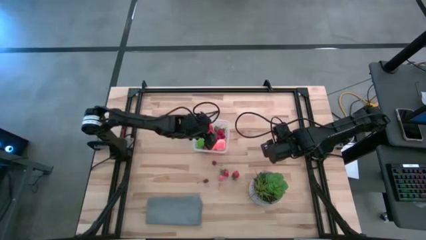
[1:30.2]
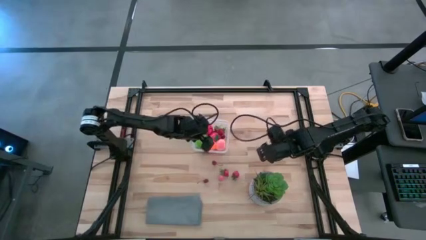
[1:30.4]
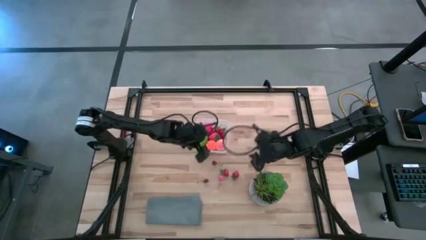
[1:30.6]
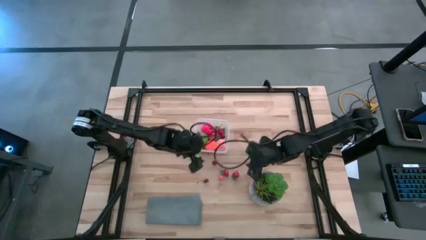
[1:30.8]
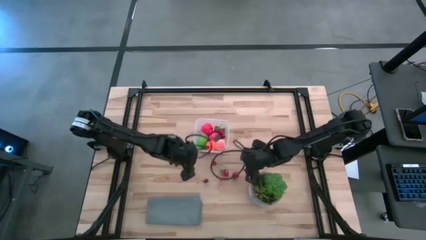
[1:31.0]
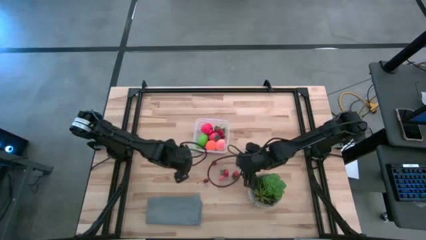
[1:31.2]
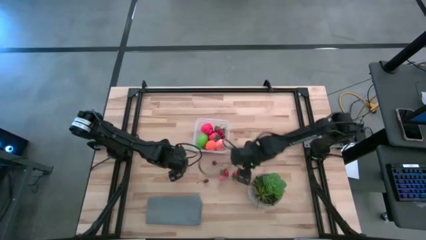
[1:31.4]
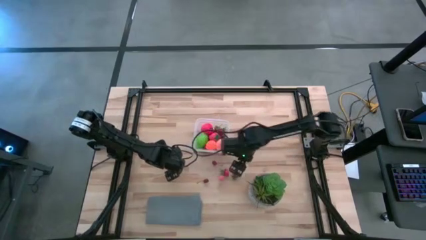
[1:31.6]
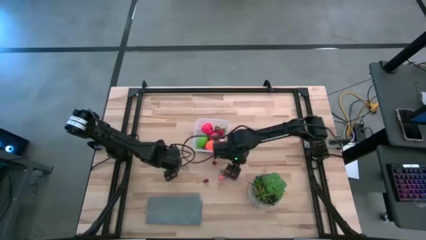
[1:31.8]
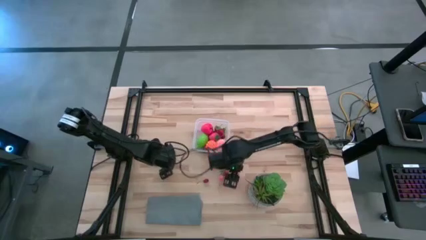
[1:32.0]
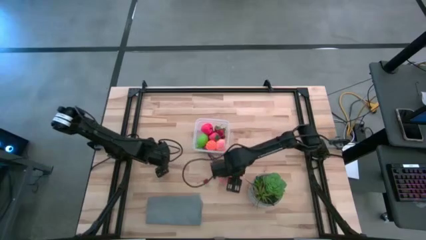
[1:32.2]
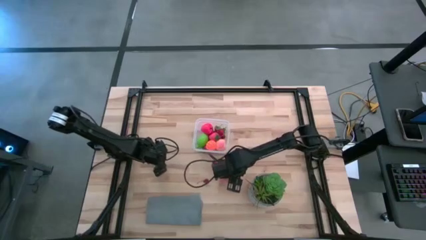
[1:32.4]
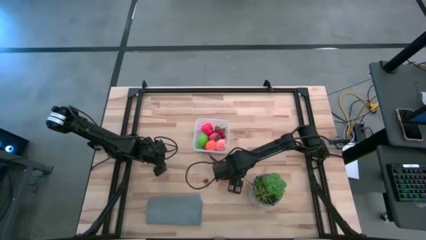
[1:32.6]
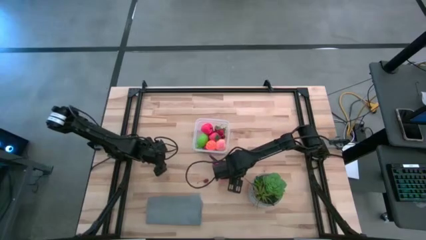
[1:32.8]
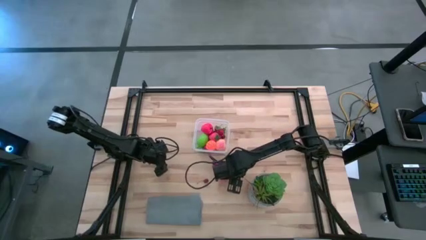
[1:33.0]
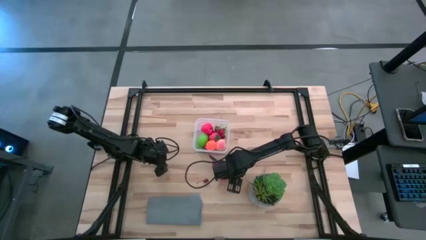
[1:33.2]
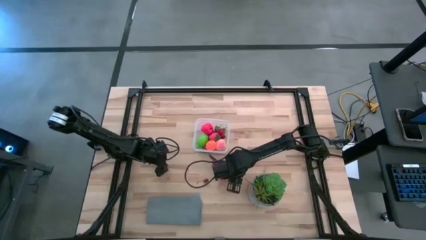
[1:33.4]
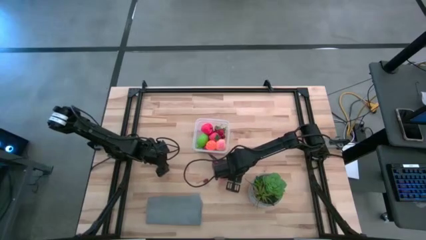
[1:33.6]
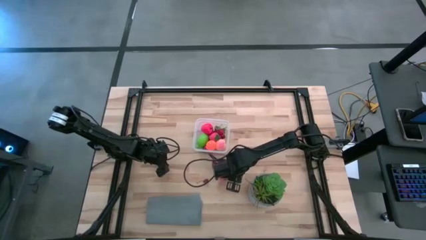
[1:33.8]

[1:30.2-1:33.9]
Task: Pick and placing Produce into tupperware
Put the red strawberry into the transparent bin

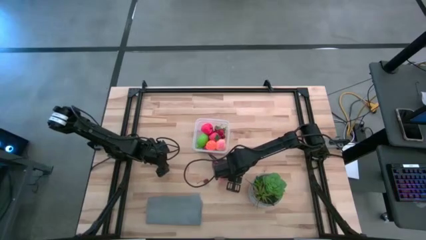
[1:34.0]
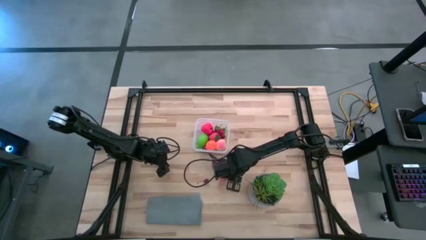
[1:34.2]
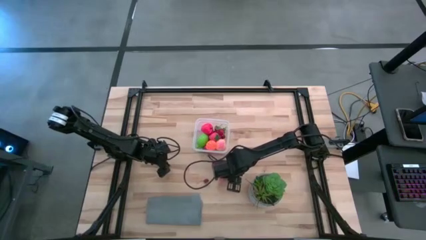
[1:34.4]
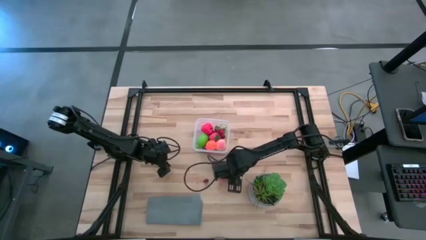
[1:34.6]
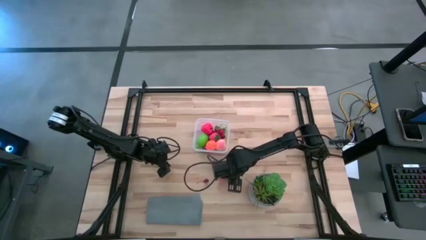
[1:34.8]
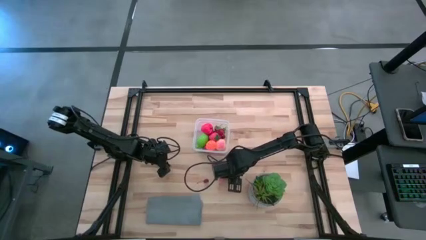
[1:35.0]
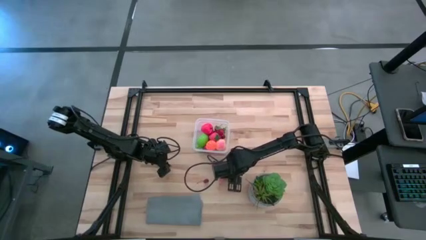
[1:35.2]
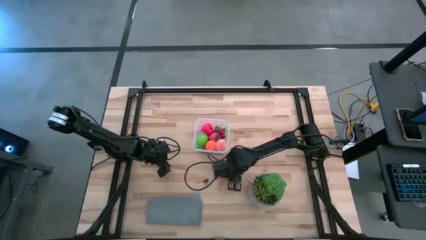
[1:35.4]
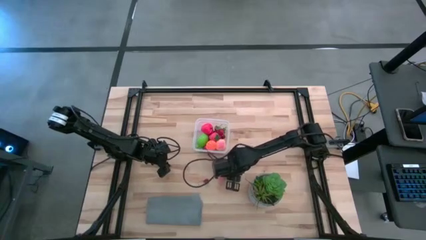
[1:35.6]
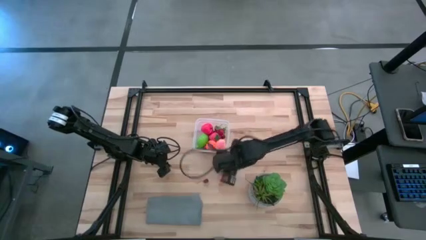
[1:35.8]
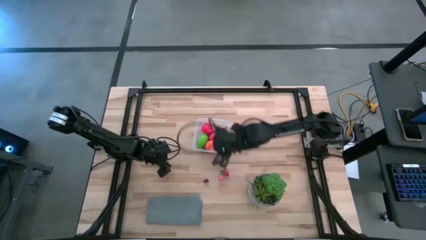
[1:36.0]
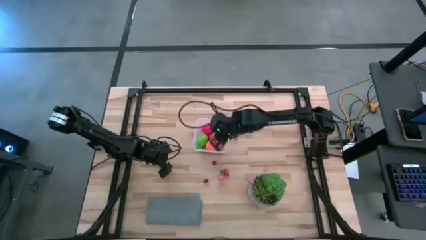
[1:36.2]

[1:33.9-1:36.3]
Put the red strawberry into the transparent bin

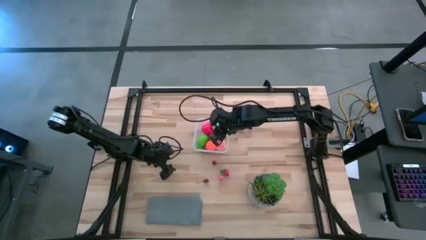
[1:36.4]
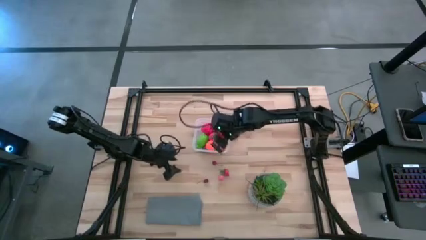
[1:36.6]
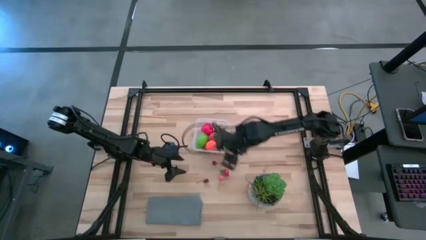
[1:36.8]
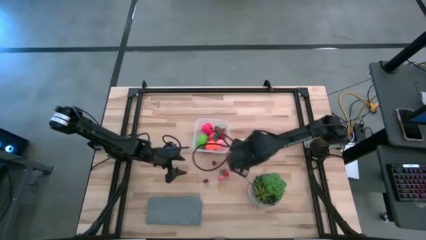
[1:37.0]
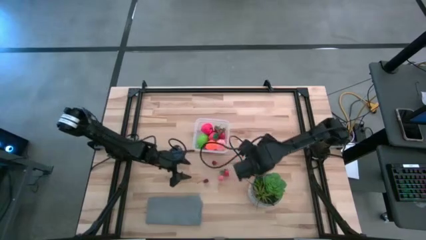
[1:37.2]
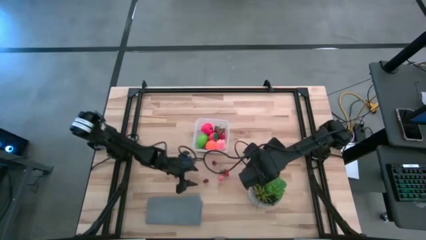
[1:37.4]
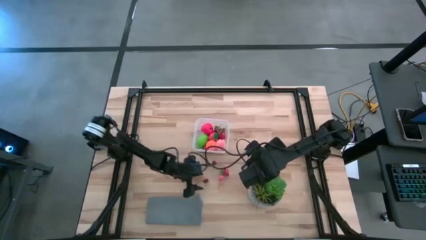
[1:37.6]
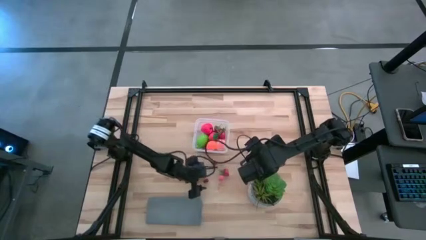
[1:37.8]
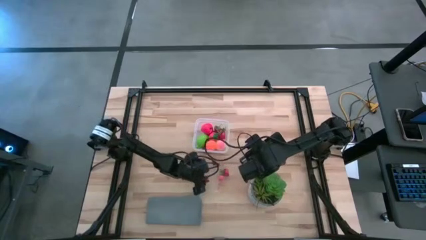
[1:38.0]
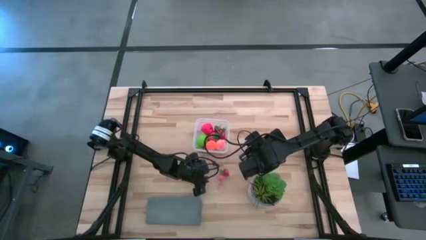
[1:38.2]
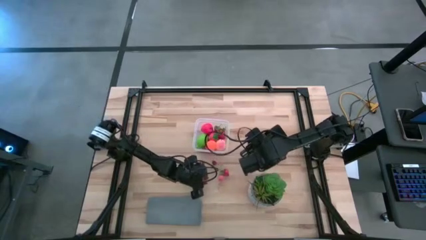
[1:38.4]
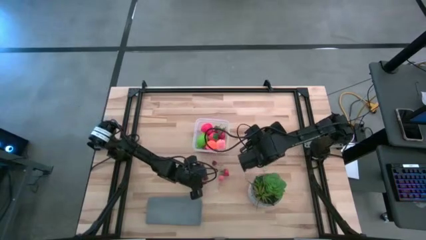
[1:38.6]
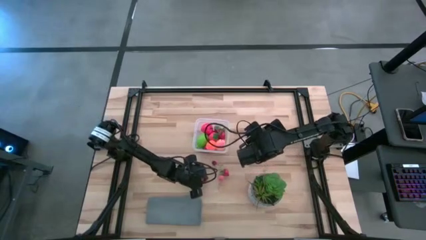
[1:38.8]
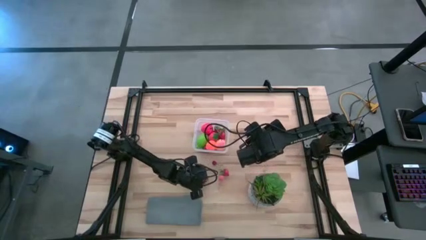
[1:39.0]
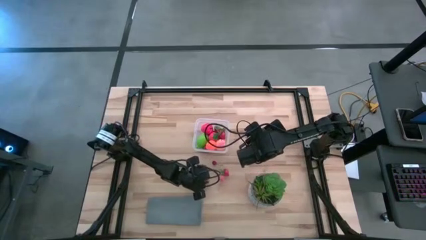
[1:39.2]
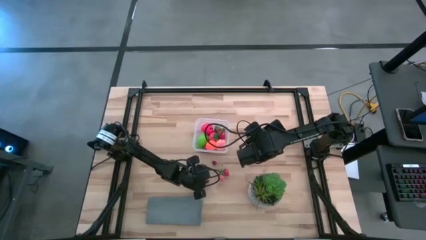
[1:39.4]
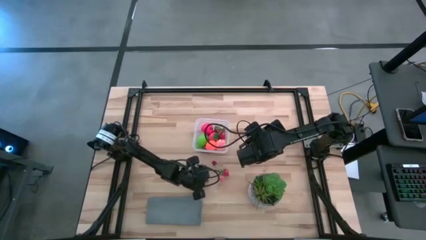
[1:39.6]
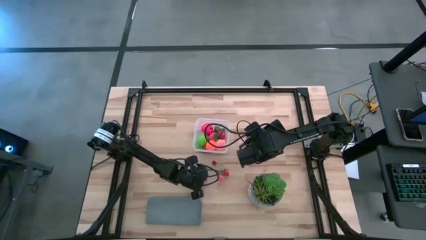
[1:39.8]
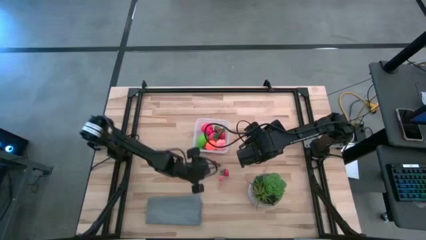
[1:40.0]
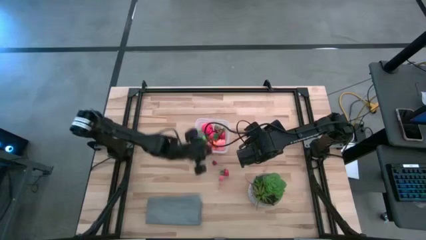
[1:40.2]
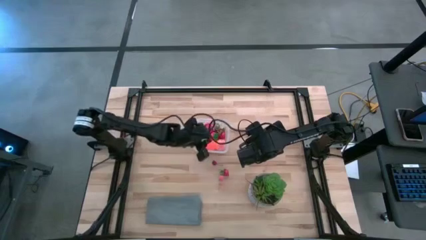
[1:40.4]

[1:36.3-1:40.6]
Put the red cherry into the transparent bin

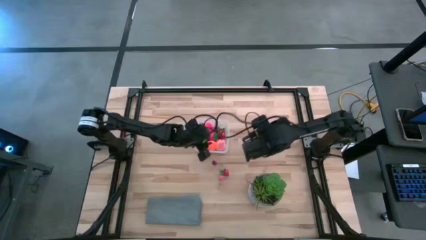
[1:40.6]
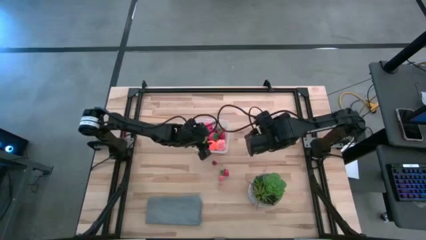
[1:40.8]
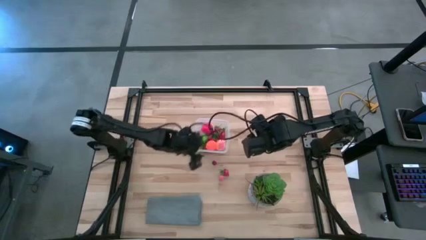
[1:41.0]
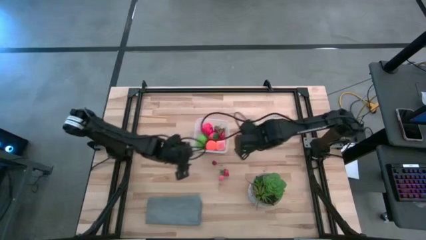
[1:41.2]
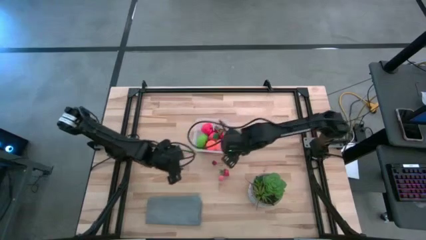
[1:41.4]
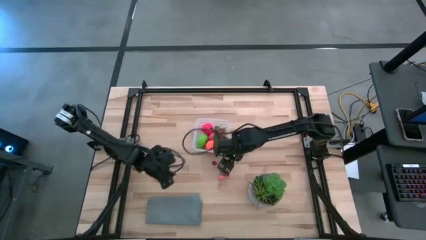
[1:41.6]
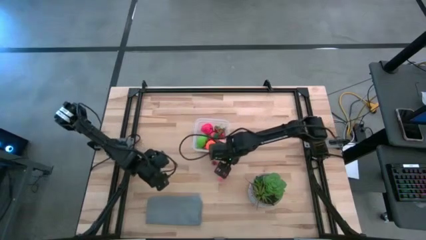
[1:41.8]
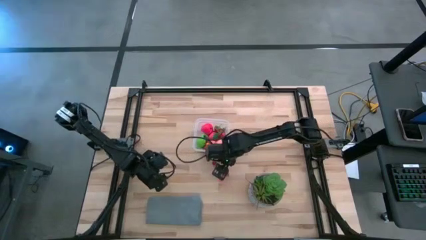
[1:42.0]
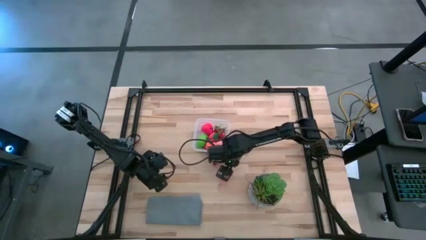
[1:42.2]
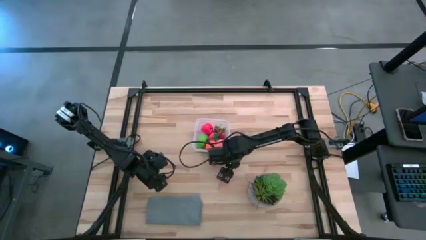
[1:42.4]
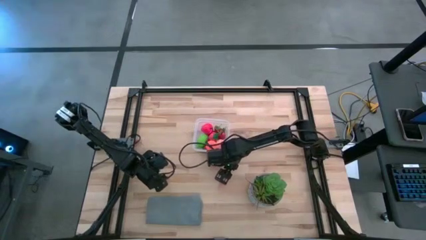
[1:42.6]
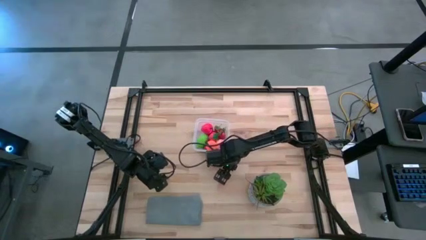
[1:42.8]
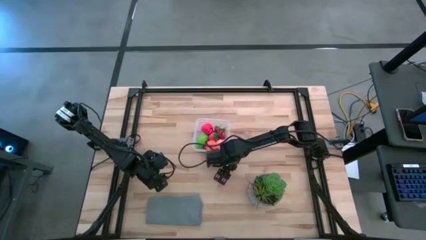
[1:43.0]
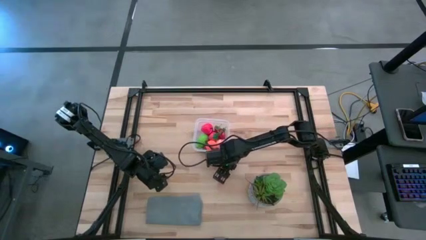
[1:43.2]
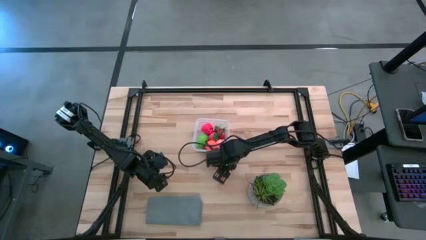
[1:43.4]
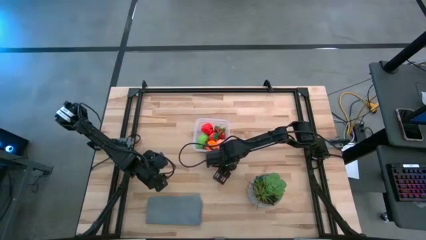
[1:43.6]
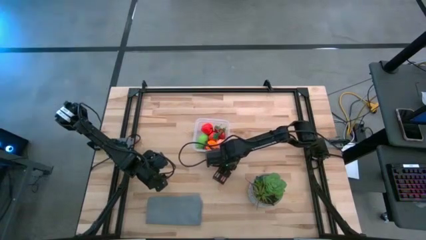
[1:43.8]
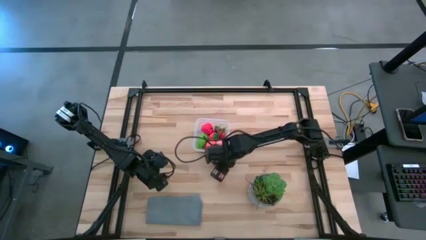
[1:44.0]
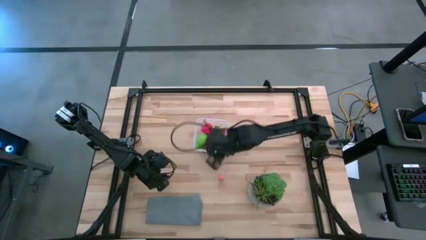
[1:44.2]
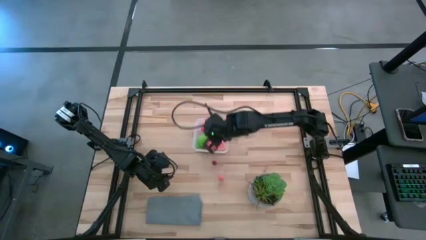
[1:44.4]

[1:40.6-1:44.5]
Put the red strawberry into the transparent bin

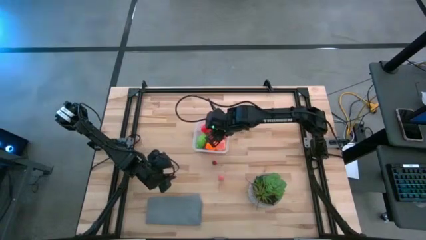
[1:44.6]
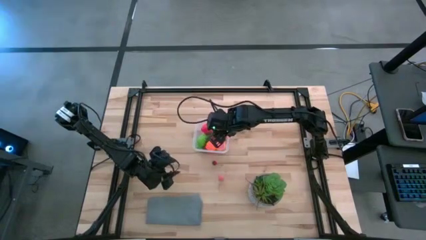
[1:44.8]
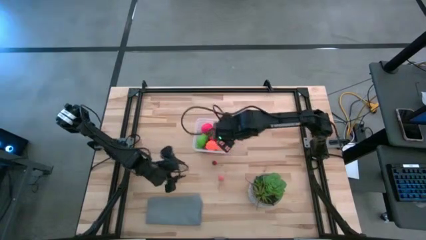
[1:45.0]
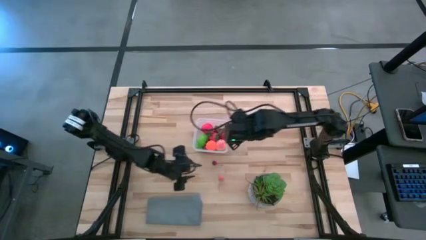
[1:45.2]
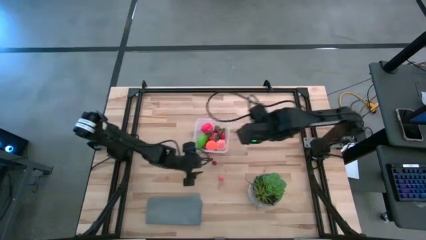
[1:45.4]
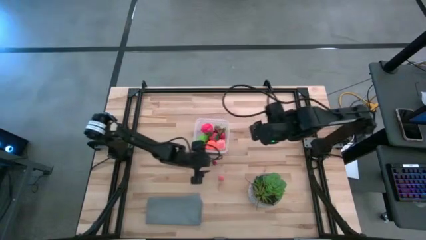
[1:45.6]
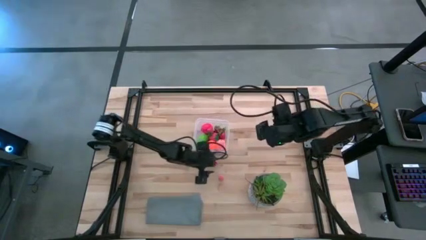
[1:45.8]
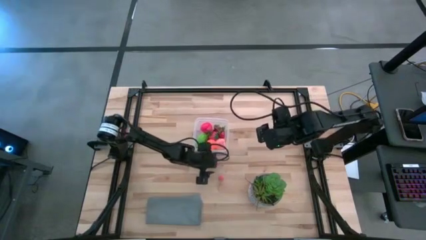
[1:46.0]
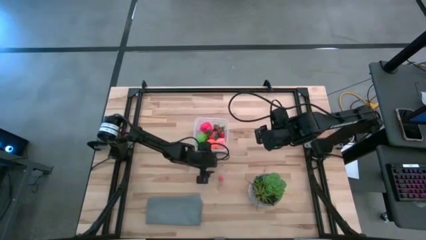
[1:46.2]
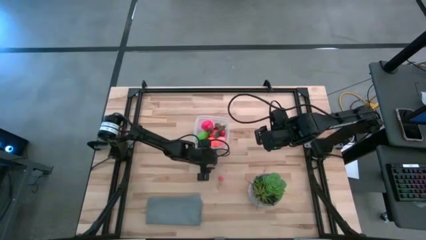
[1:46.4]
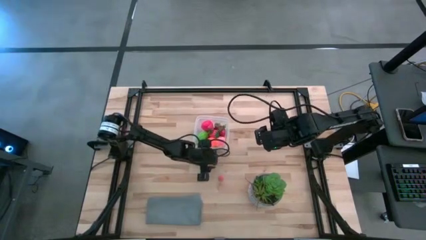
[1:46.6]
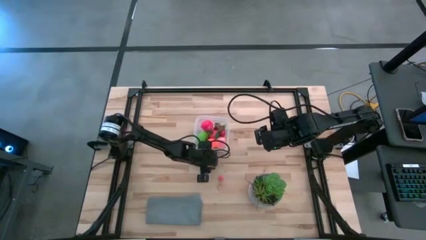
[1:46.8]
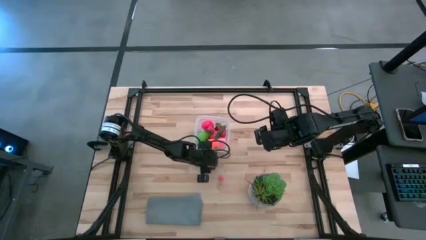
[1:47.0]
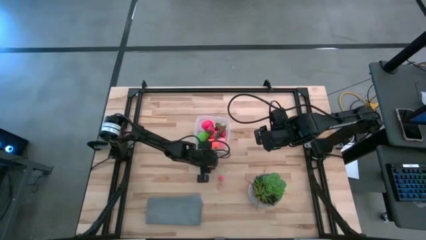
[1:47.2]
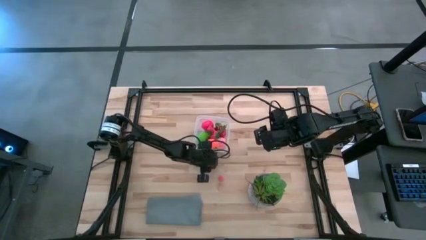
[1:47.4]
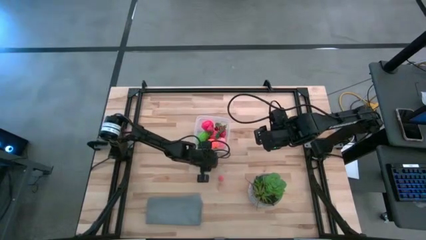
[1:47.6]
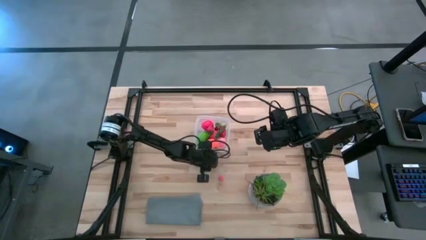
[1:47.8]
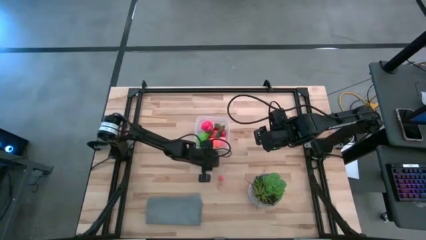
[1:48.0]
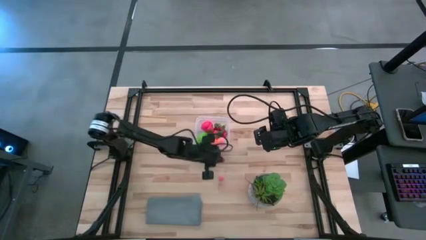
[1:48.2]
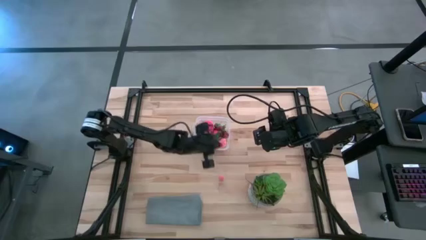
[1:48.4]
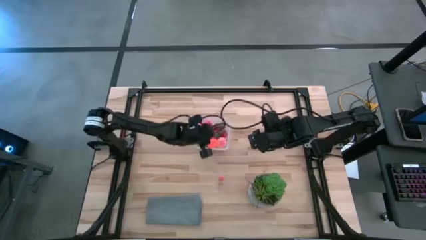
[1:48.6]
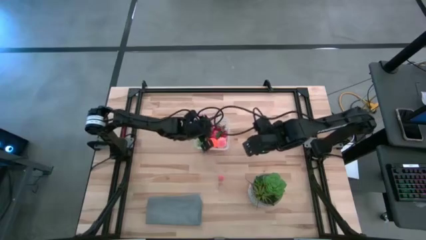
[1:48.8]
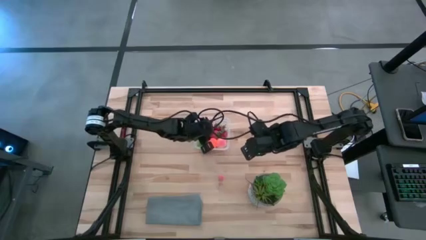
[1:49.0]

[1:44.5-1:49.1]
Put the red cherry into the transparent bin
